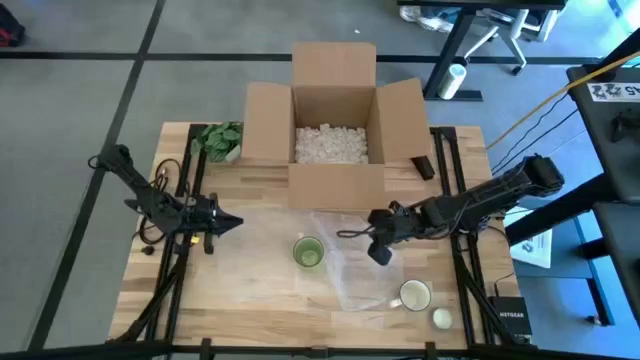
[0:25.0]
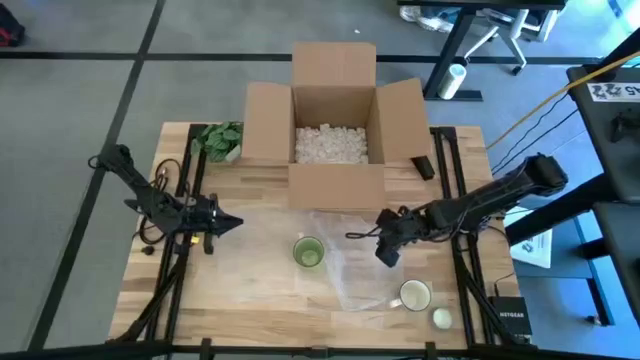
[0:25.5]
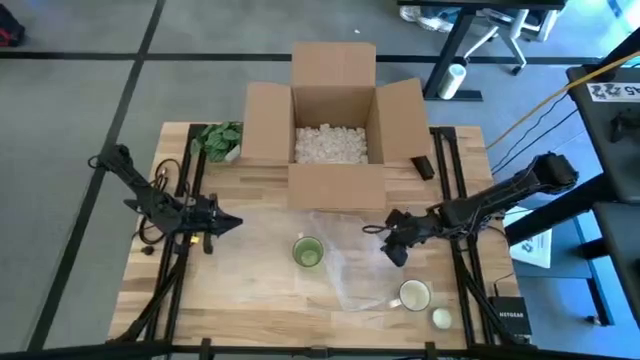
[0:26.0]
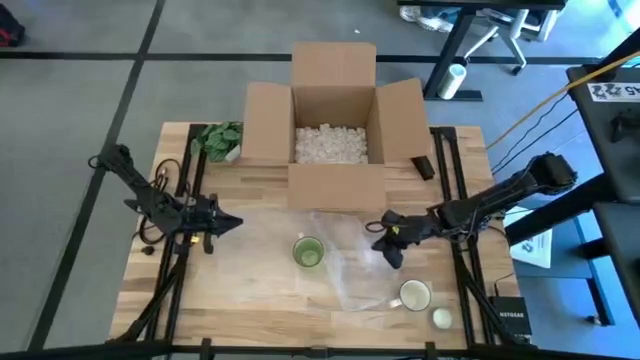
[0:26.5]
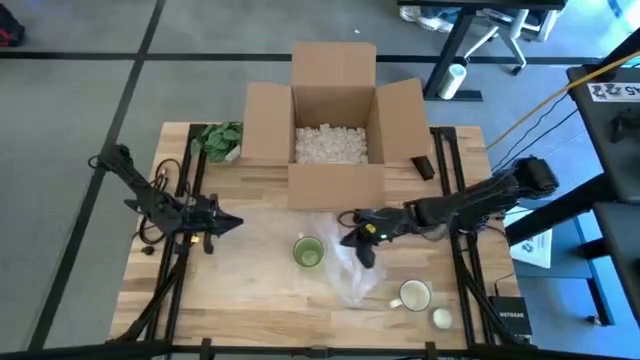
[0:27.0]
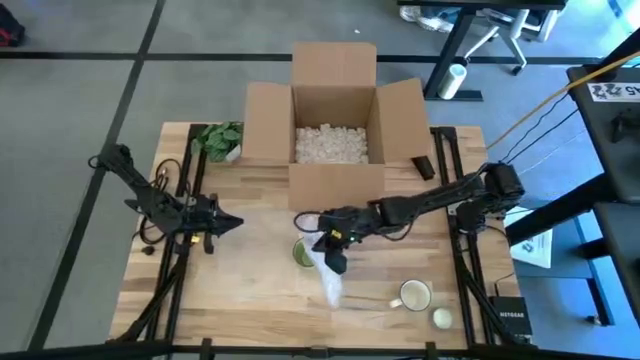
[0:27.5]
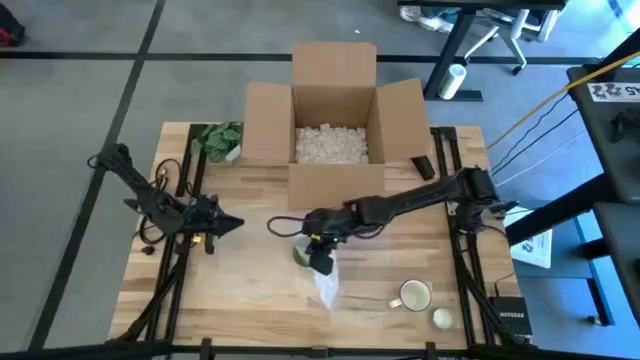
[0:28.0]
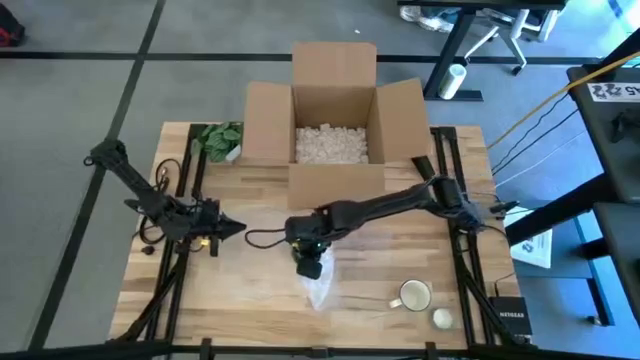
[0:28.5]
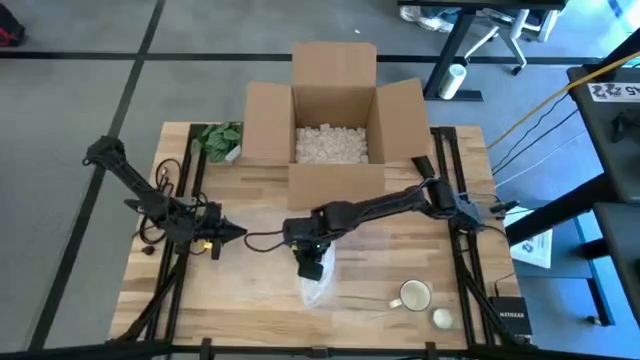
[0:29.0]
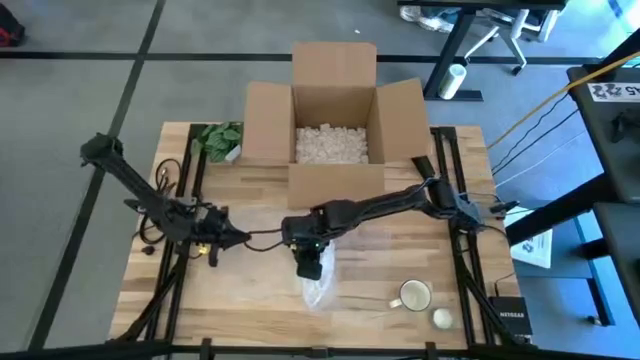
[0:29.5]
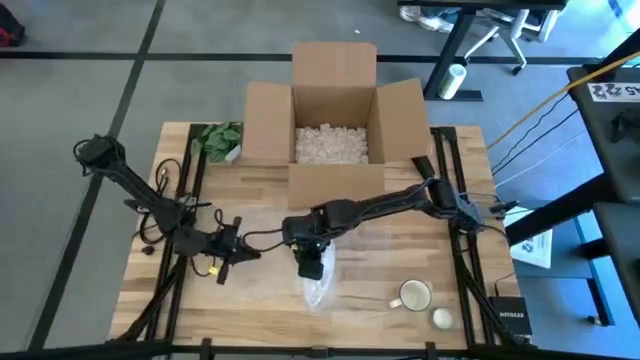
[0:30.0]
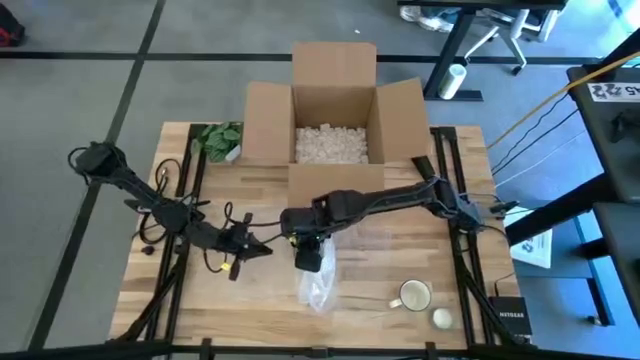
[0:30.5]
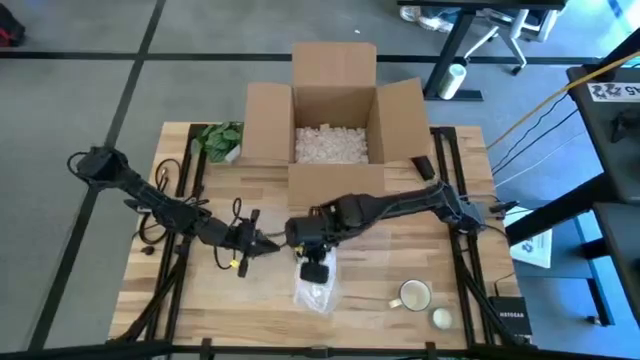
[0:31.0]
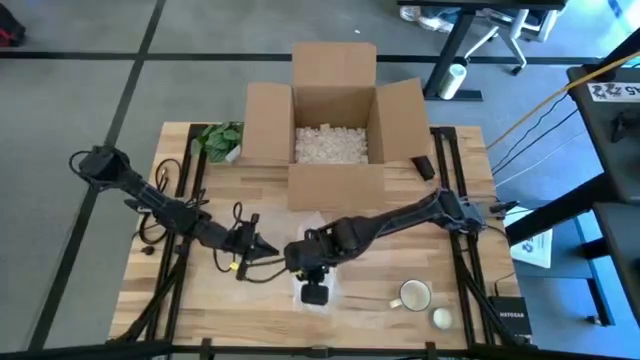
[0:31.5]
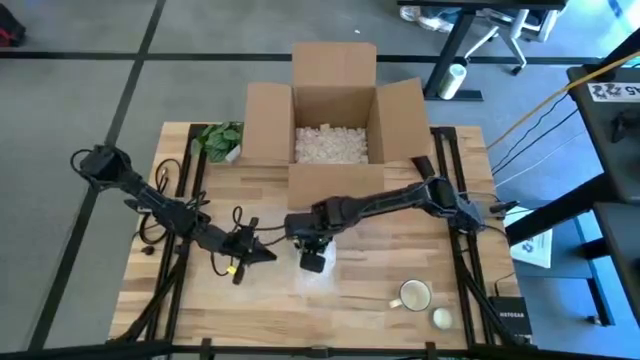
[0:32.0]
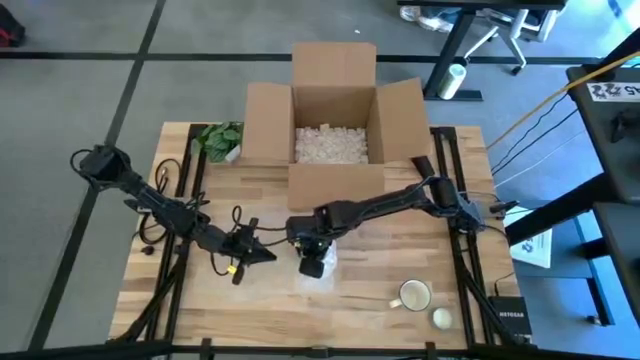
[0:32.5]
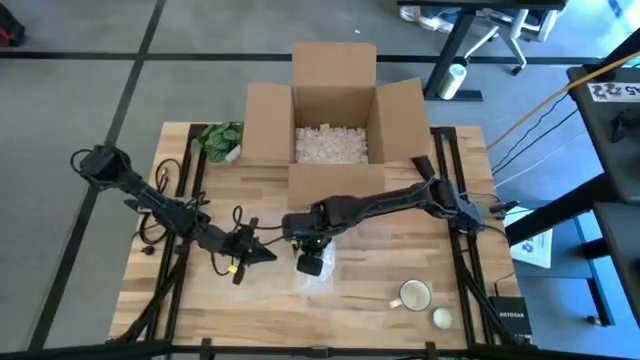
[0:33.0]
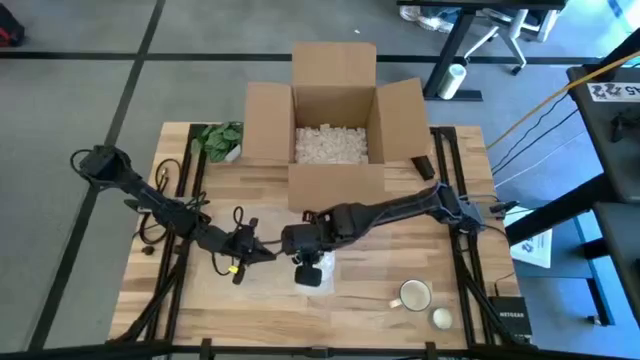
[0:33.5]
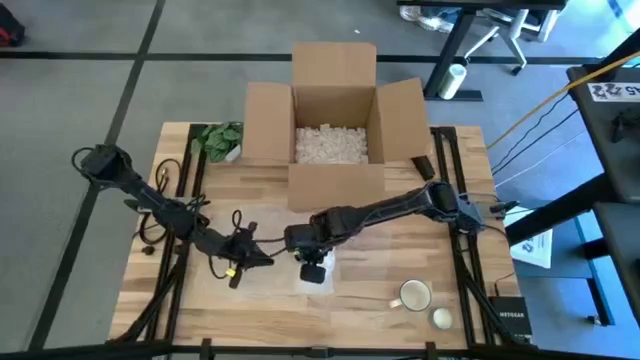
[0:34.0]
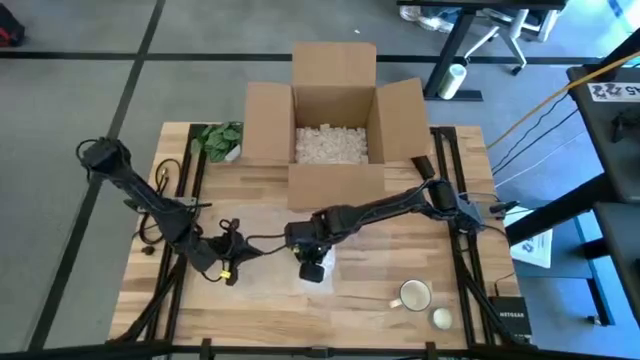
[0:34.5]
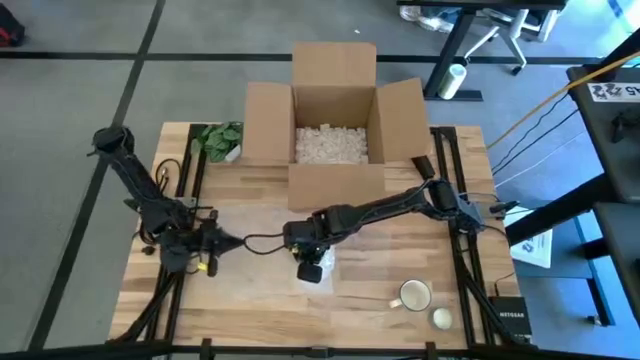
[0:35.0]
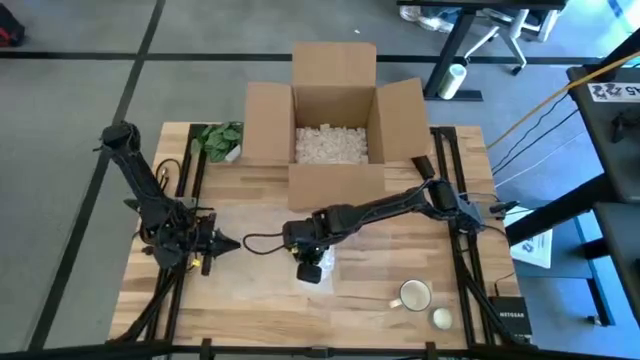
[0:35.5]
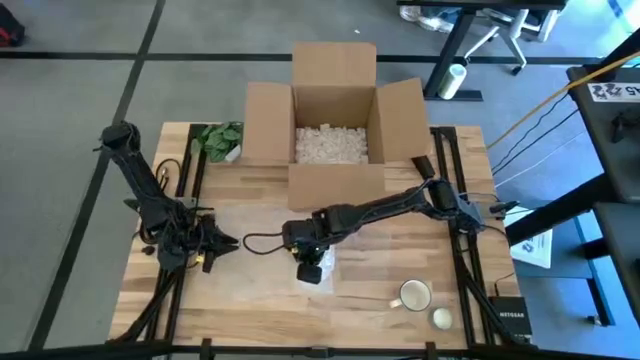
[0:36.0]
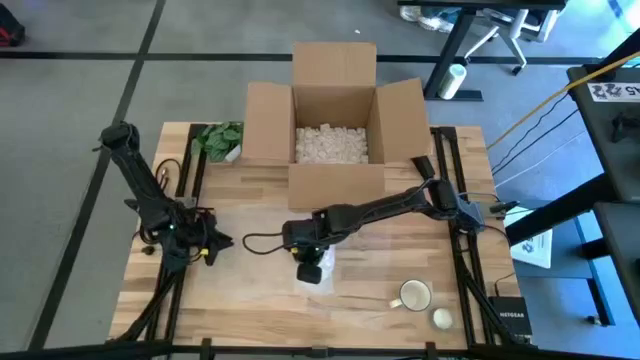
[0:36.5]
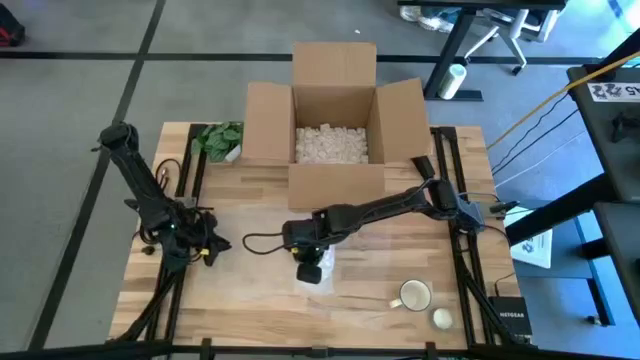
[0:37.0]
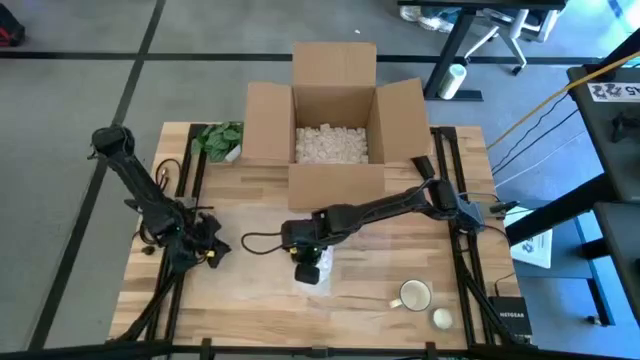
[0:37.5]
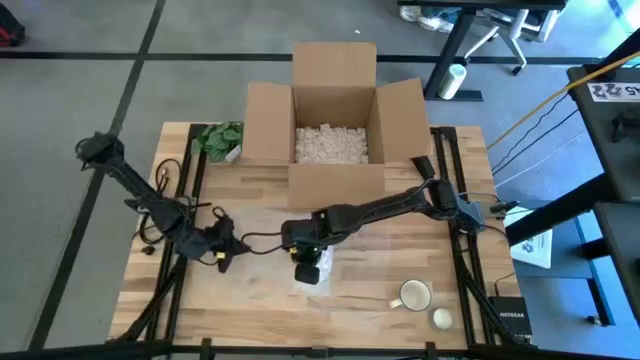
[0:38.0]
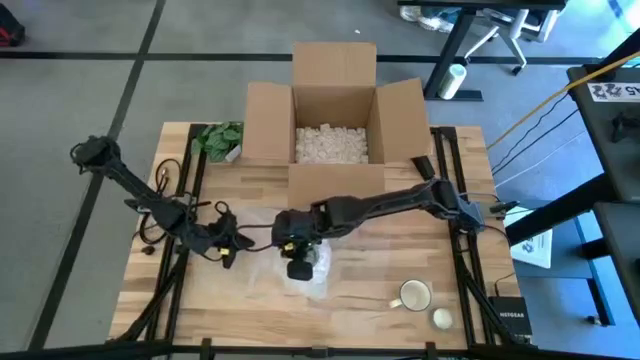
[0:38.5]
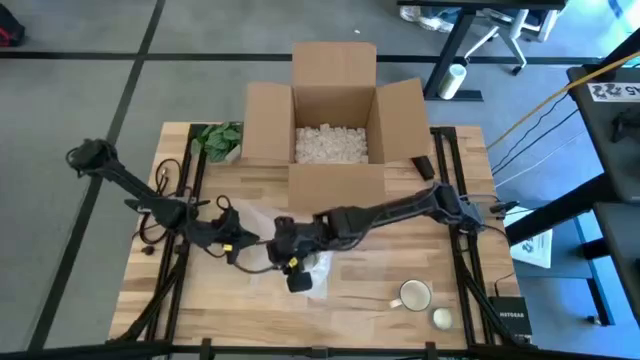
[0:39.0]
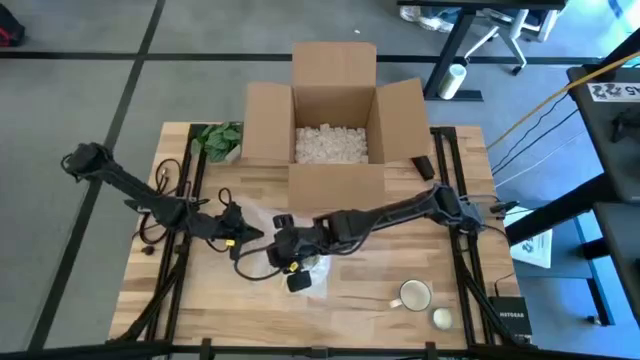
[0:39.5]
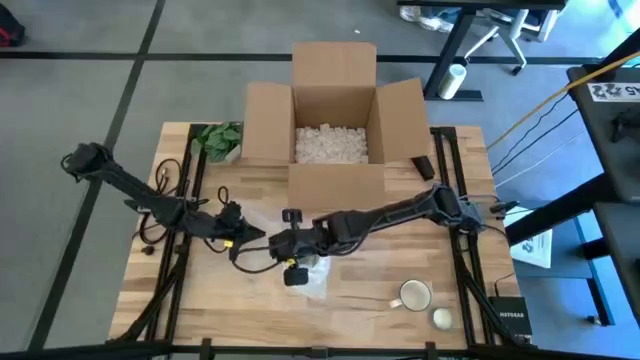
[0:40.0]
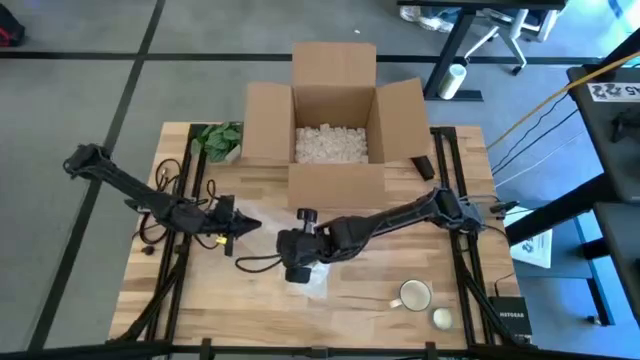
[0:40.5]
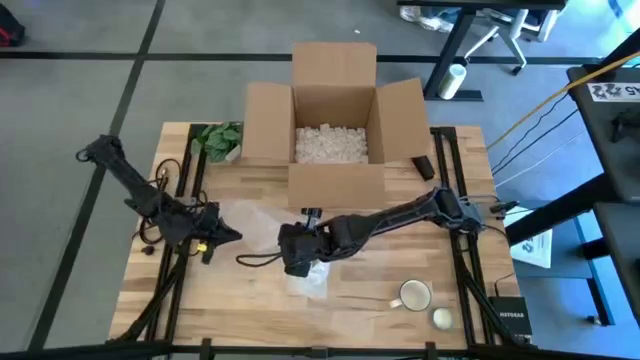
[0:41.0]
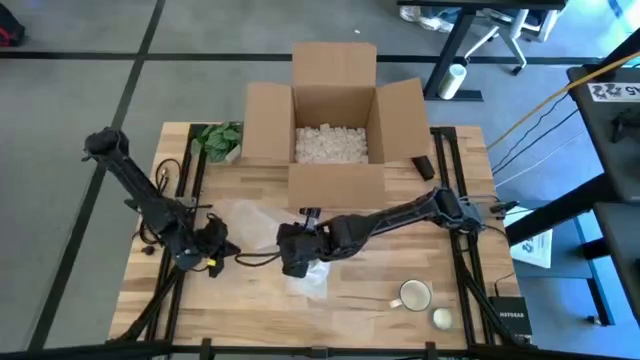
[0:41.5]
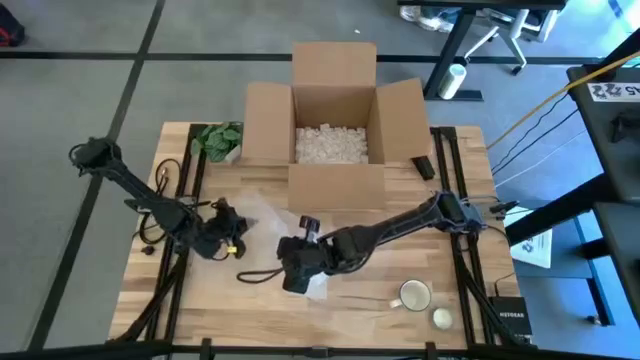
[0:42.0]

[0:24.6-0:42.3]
Task: wrap mug
Wrap the green mug with bubble wrap

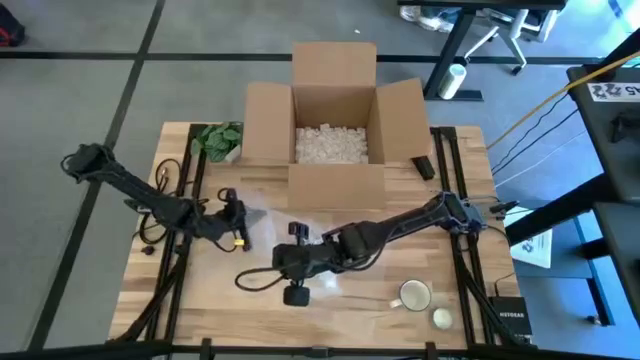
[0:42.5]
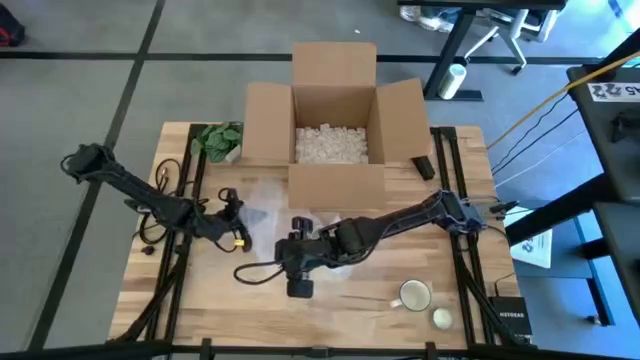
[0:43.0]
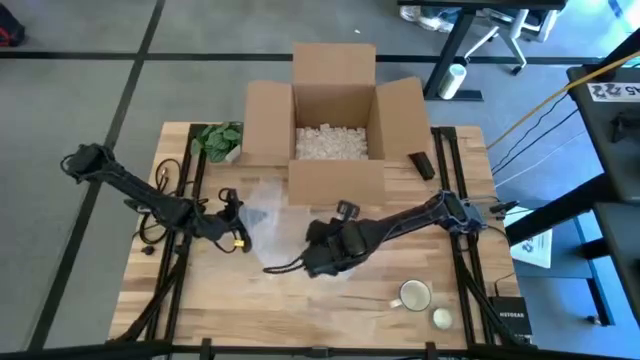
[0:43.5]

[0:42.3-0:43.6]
Wrap the green mug with bubble wrap

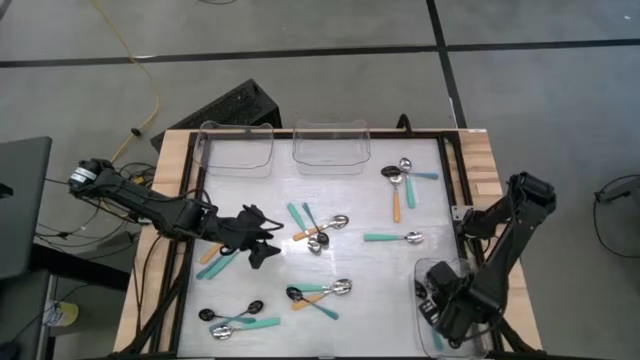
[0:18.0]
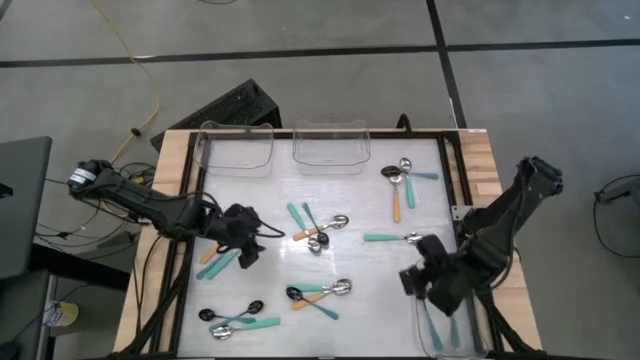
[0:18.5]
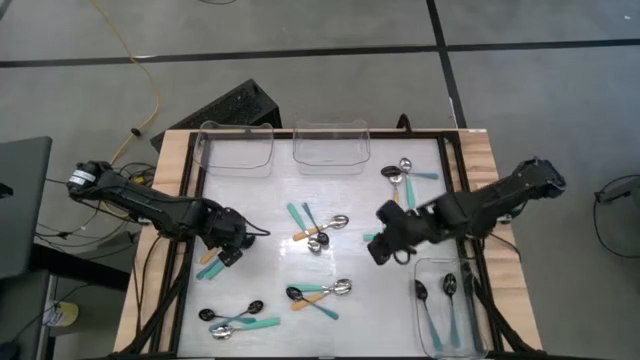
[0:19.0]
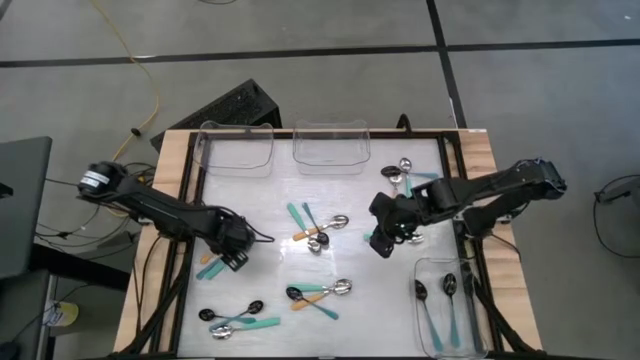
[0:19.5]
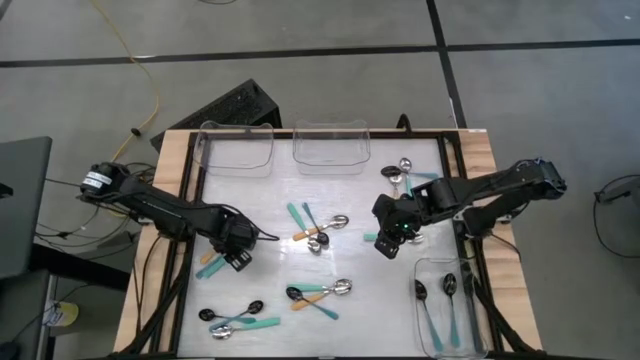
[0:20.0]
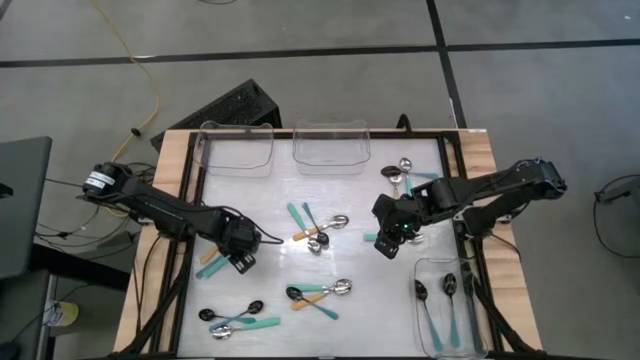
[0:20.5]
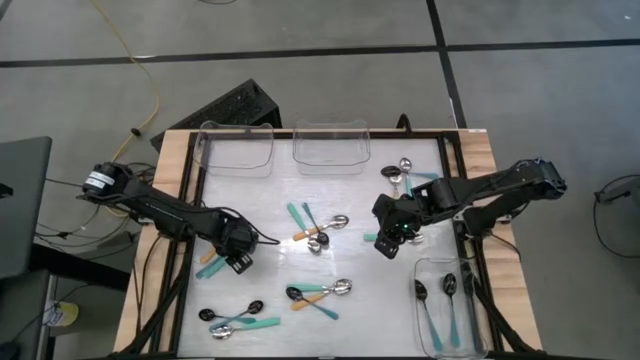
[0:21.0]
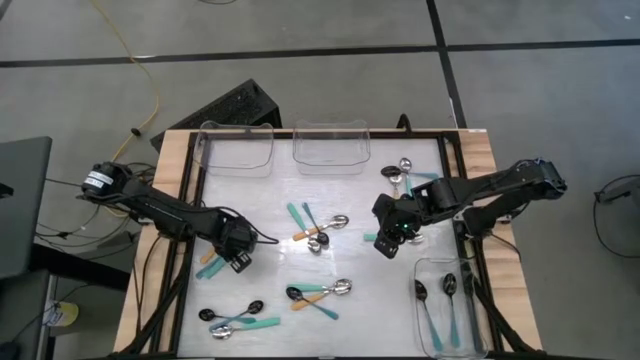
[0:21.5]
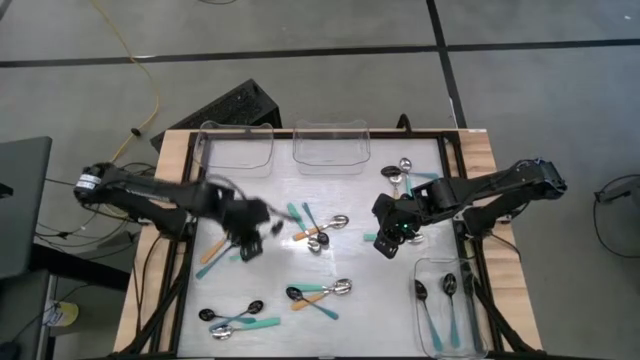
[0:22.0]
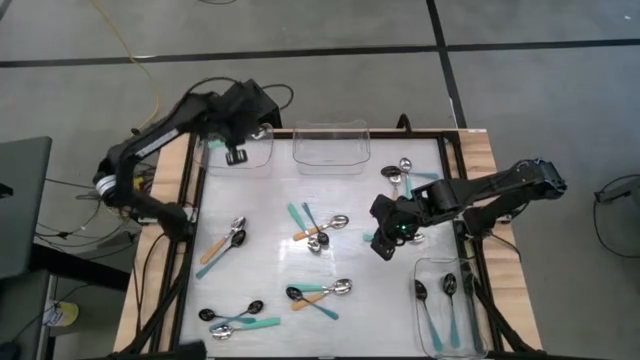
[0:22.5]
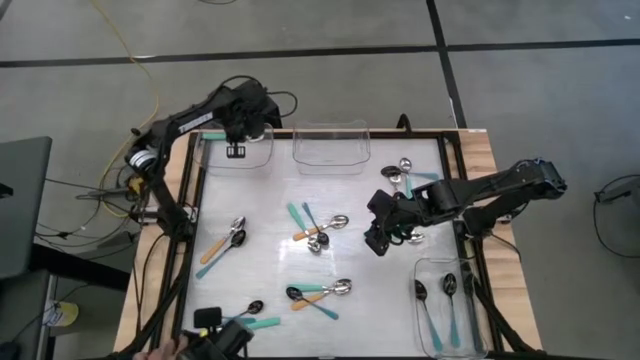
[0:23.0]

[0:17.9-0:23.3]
Task: Sort silverware by color (type)
Put the green spoon into the top left transparent bin
